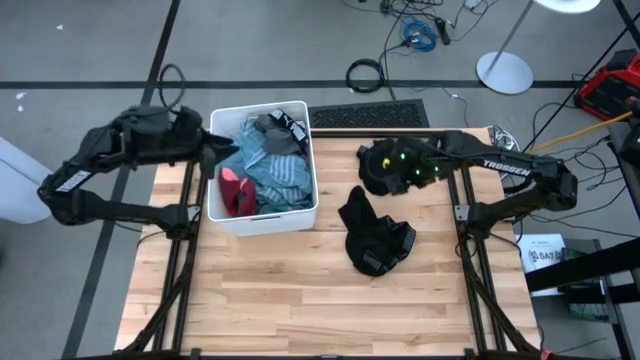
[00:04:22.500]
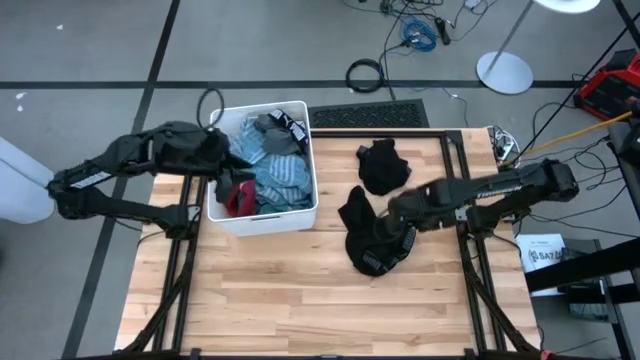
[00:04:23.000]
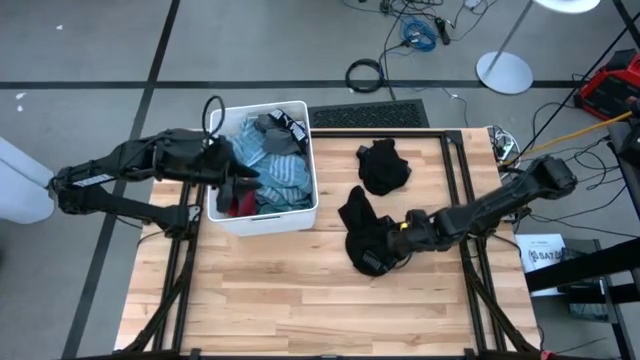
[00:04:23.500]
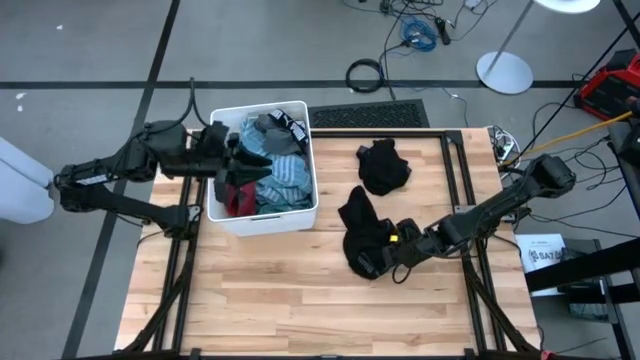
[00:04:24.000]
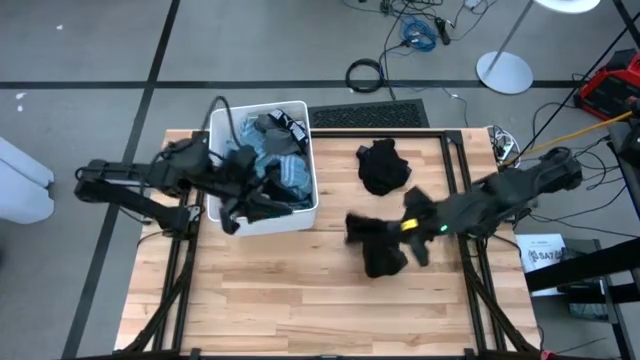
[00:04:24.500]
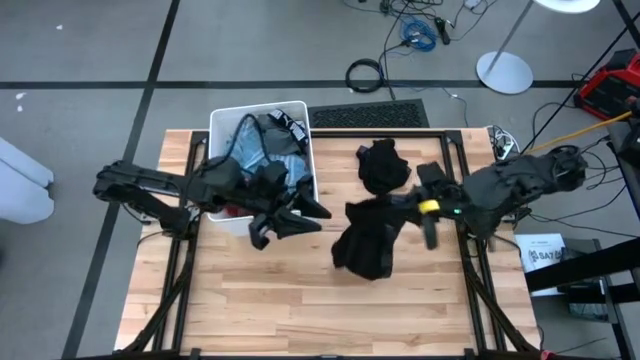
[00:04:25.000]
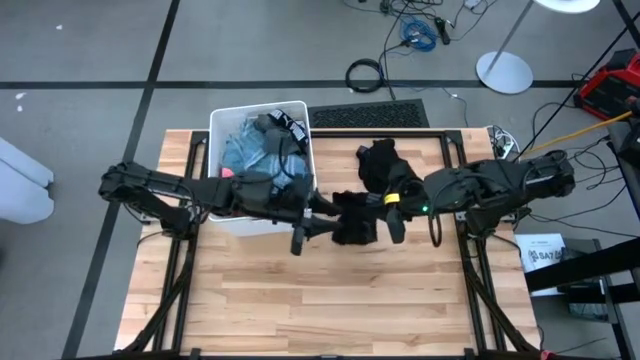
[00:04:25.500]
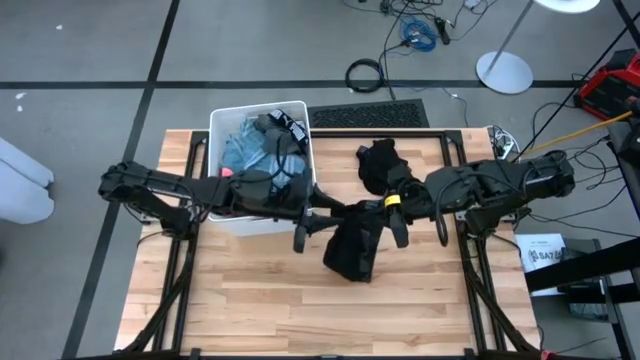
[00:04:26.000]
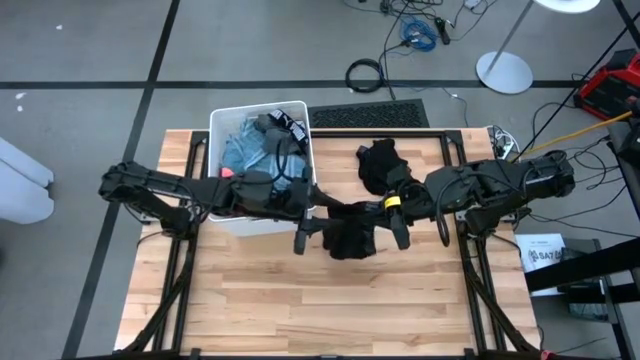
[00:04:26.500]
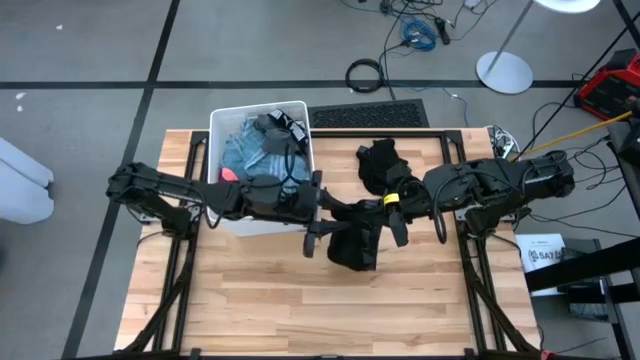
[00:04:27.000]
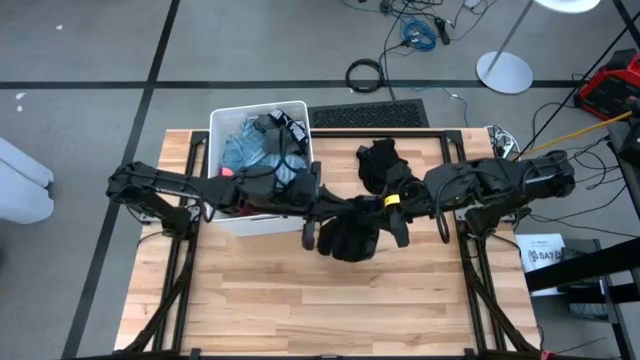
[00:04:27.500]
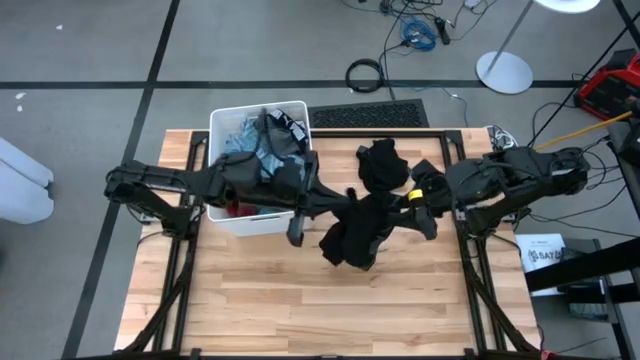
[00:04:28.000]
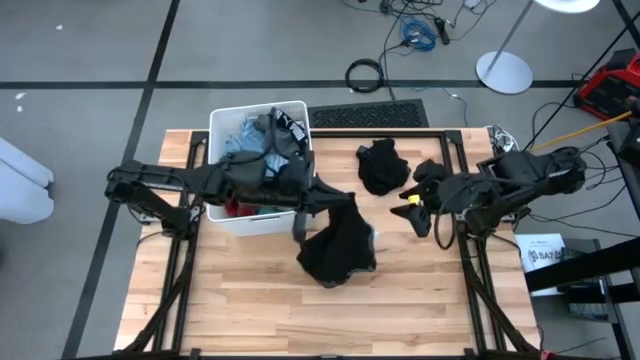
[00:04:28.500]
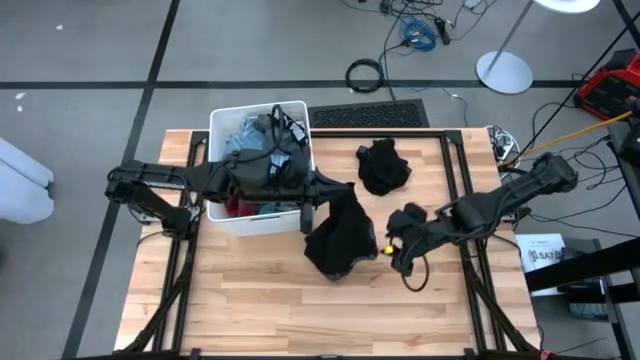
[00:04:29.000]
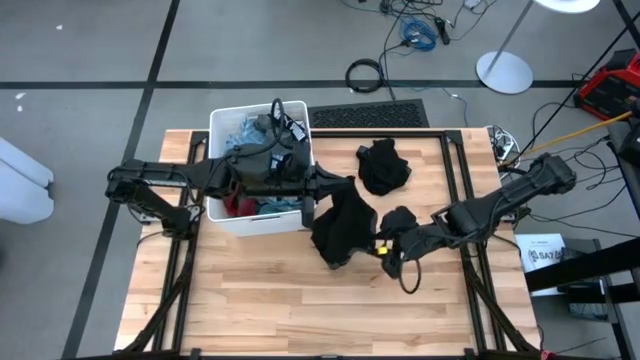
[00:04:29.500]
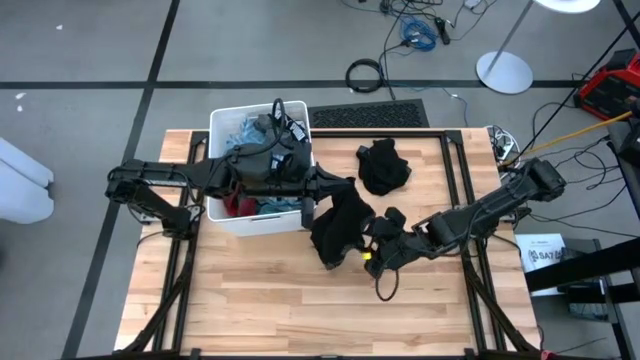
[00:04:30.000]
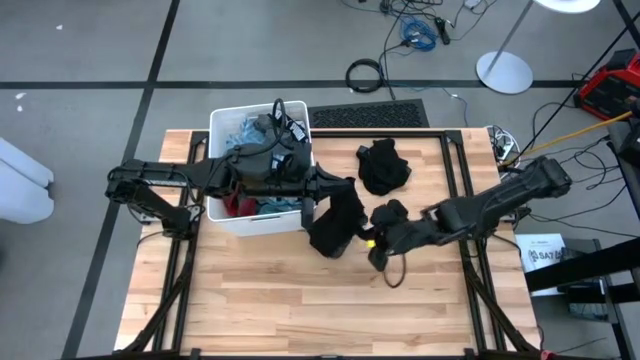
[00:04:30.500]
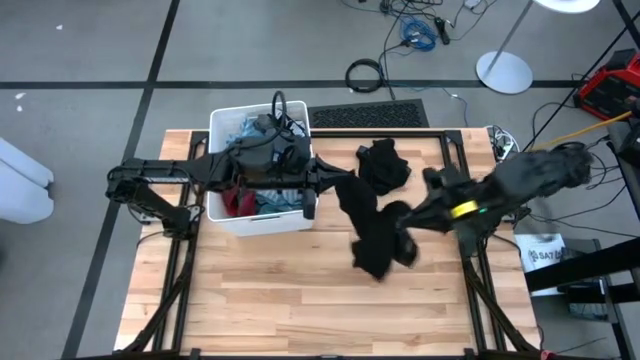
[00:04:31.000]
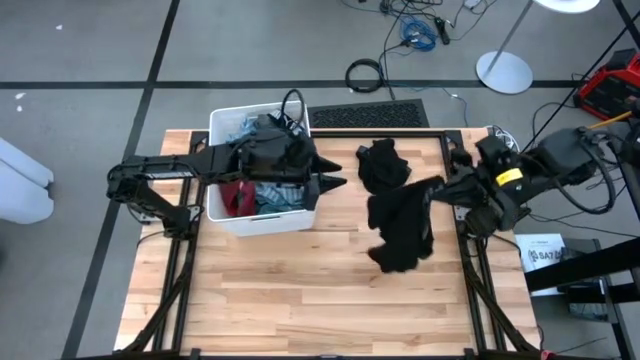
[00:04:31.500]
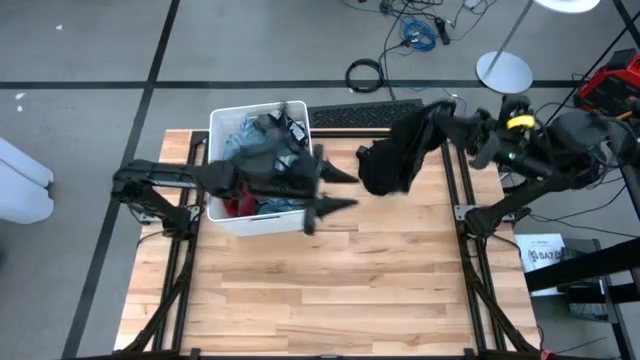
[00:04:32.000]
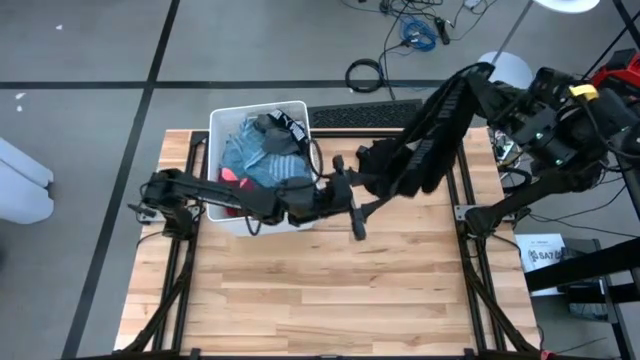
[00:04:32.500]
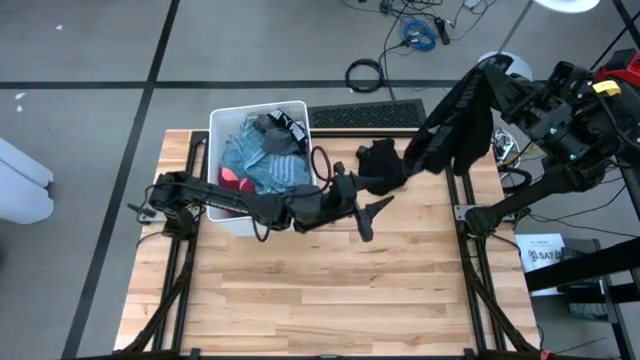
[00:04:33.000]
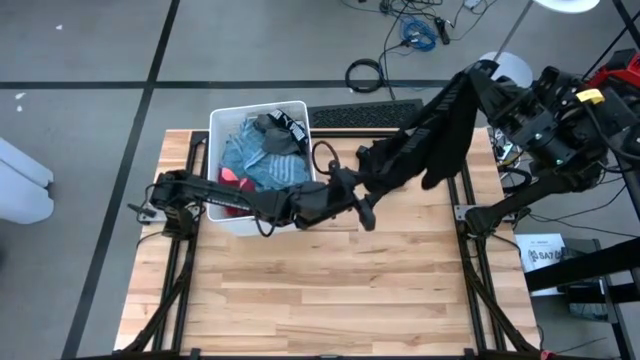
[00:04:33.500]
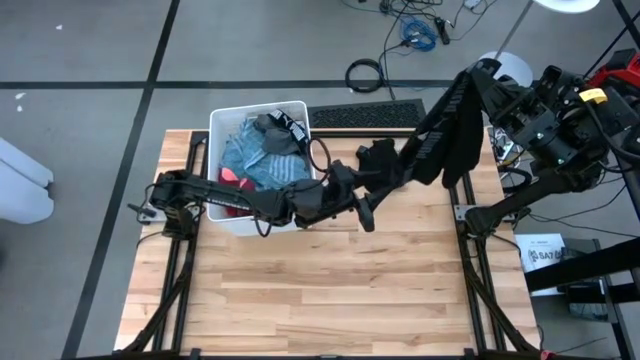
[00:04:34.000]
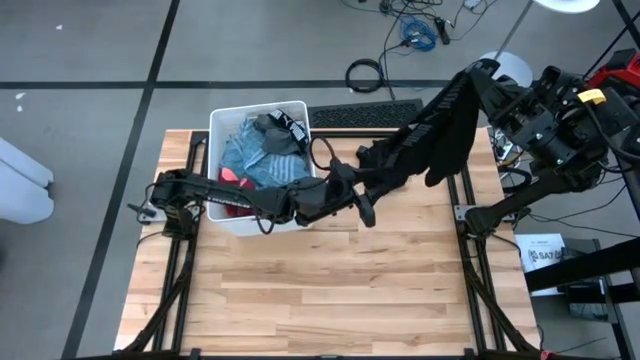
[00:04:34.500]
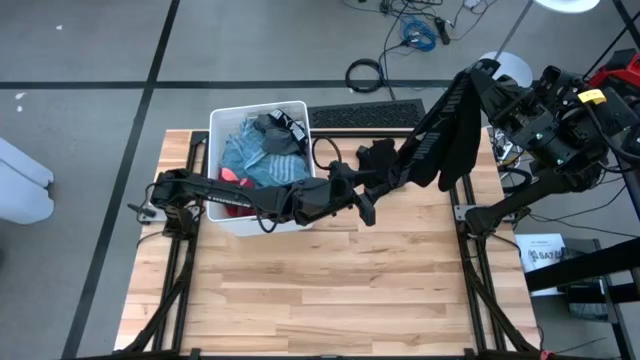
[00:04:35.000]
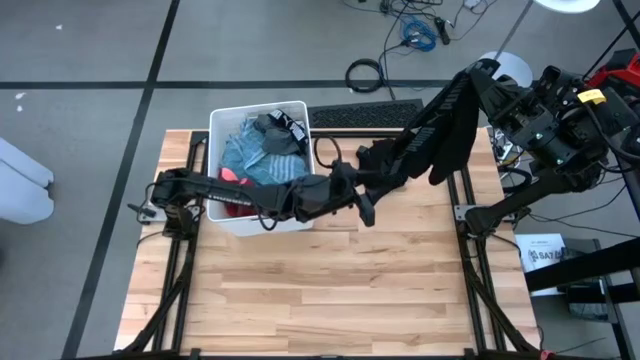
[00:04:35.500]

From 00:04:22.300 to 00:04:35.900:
Task: Sort clothes
Put the bottom black shorts into the white laundry organizer

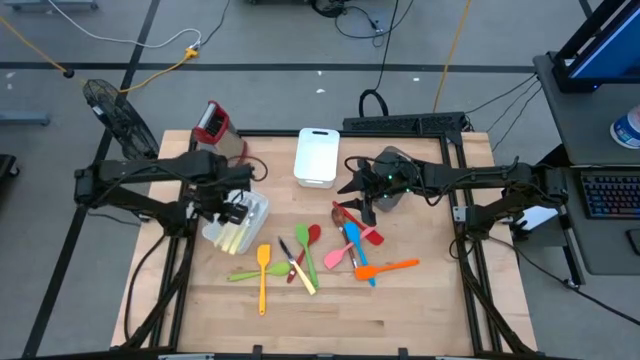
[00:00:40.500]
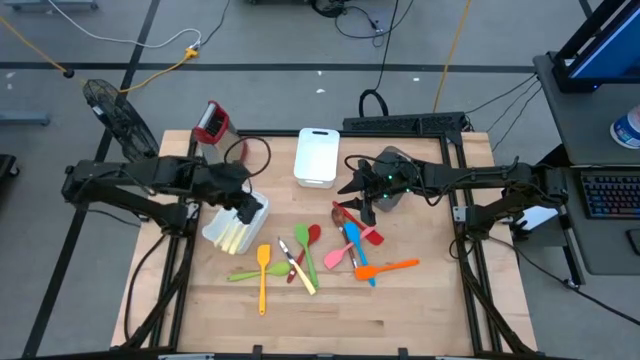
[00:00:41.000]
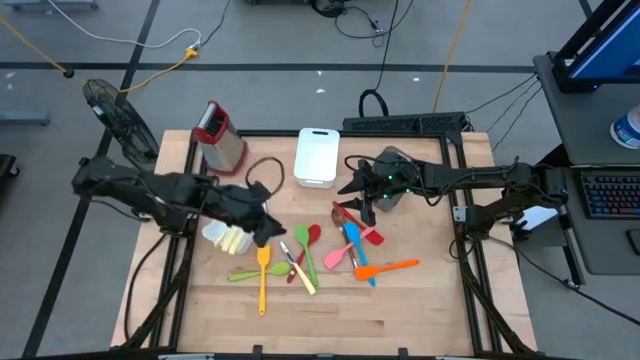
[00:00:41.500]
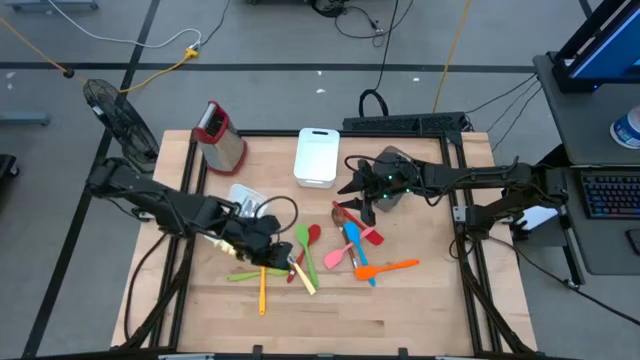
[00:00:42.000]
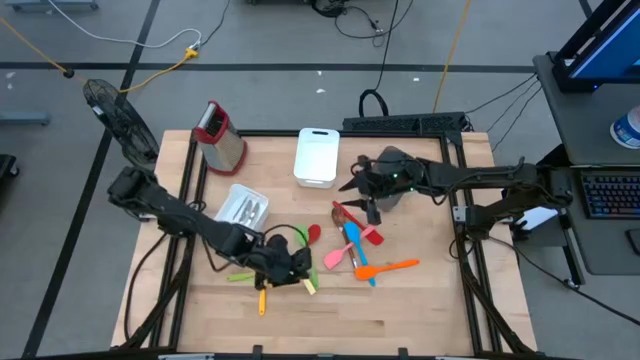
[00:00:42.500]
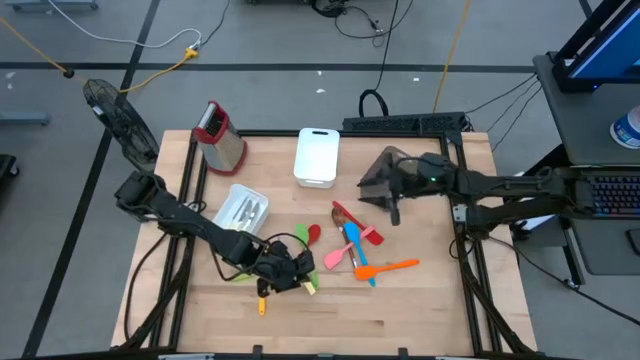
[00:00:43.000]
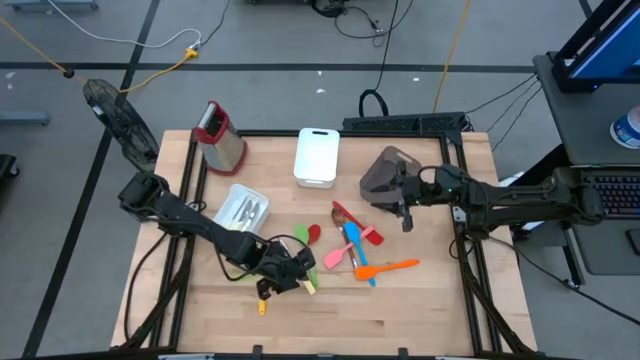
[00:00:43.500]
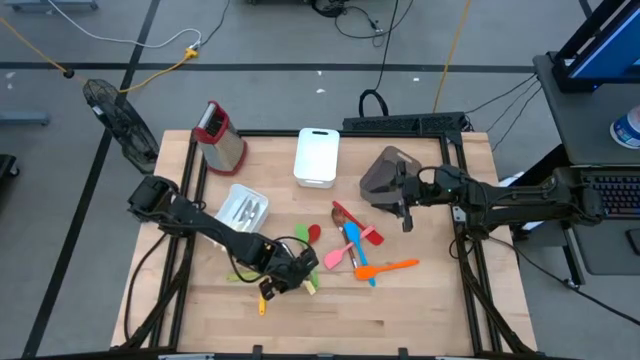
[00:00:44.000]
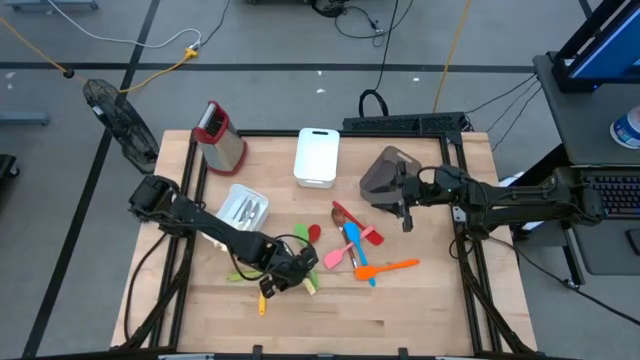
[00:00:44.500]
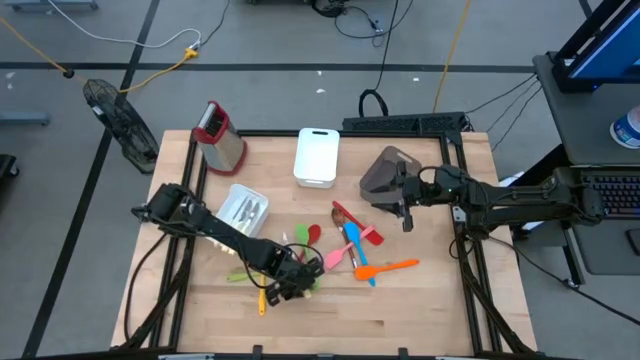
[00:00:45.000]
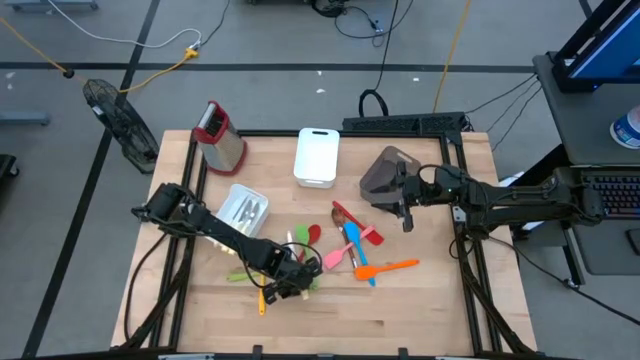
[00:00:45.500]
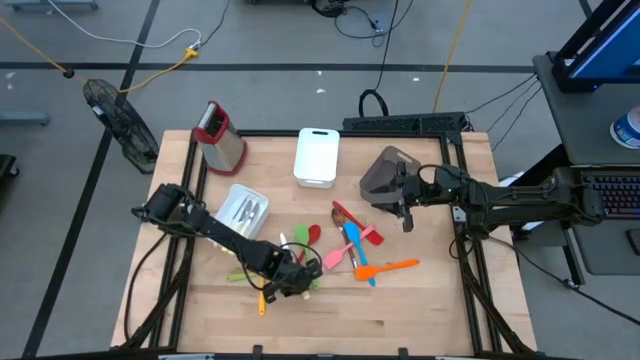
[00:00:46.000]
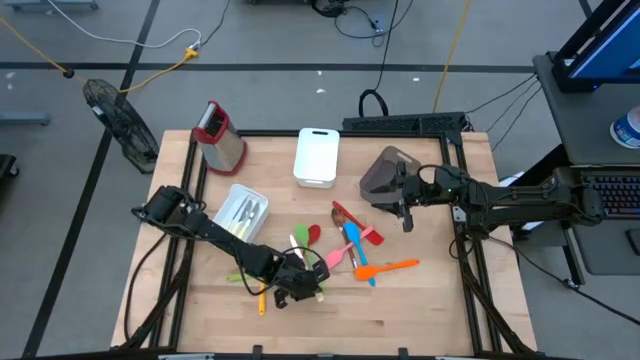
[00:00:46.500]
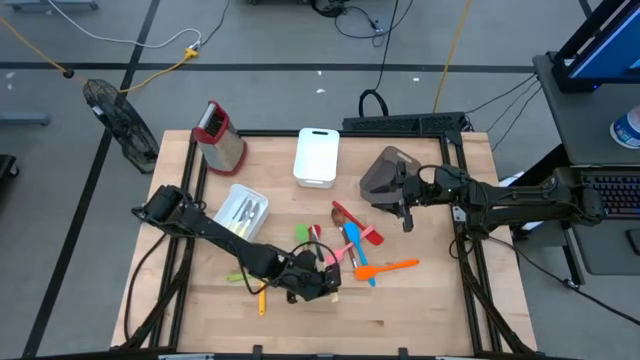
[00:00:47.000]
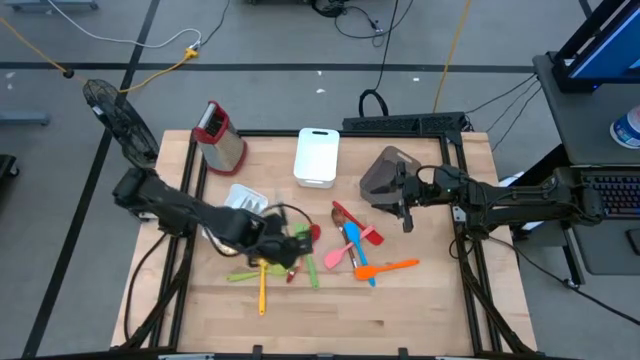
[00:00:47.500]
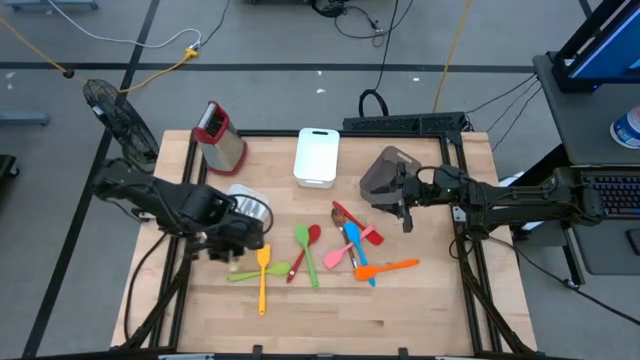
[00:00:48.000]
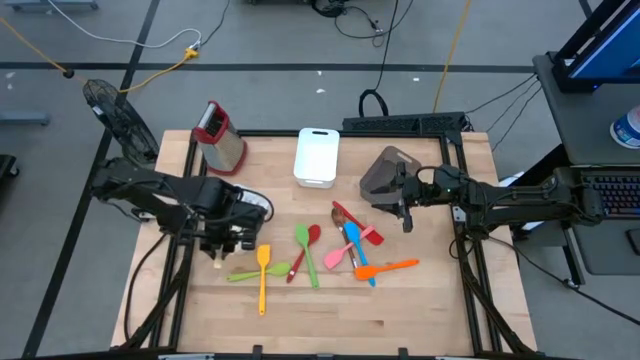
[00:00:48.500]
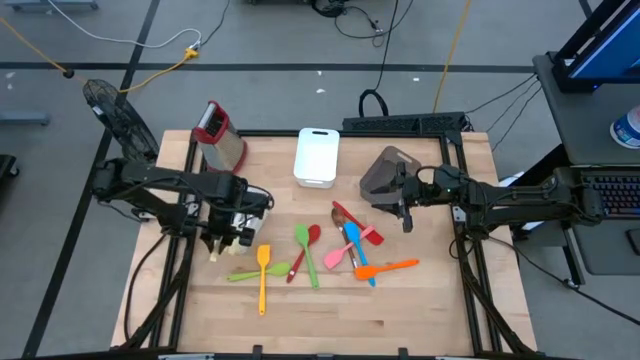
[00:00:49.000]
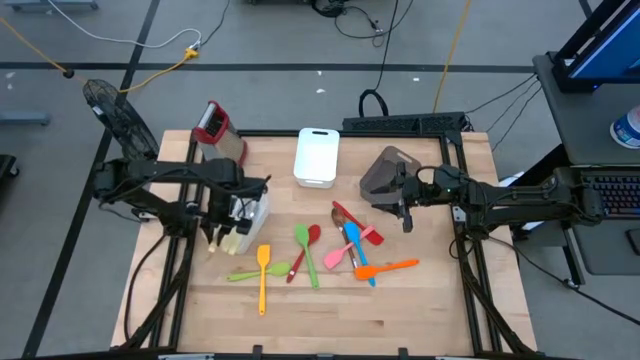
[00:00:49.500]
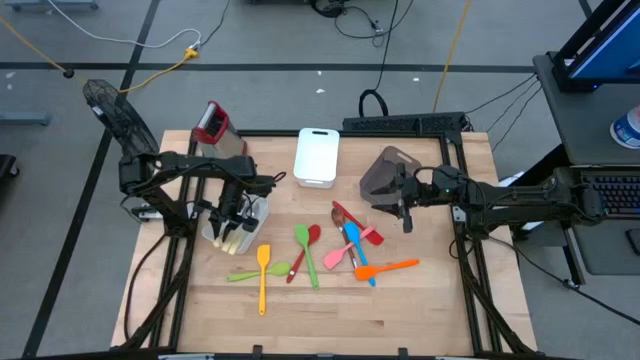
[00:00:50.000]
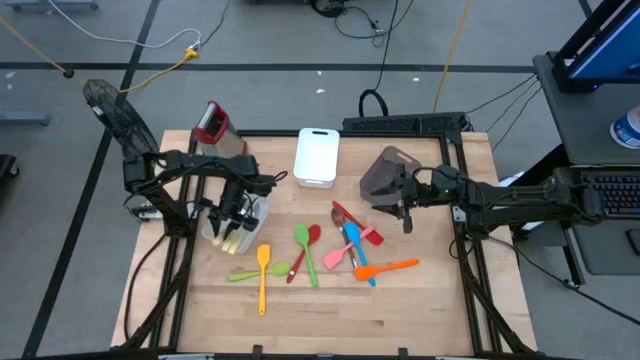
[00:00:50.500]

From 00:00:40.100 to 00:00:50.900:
Task: Pick & Place Kitchen Items
Put the yellow table knife into the bottom white bin
